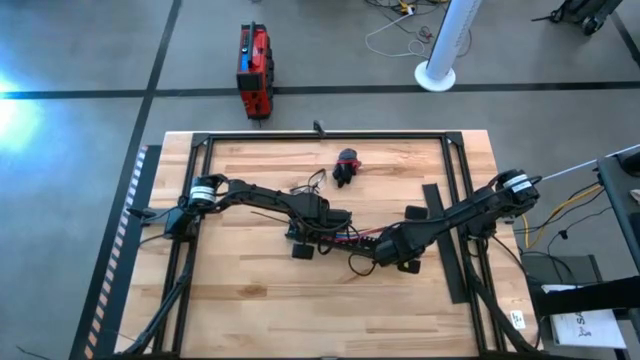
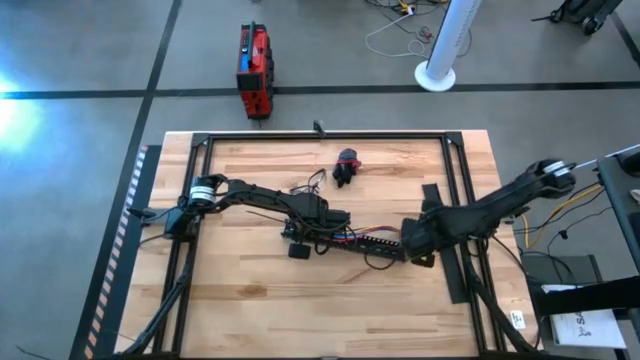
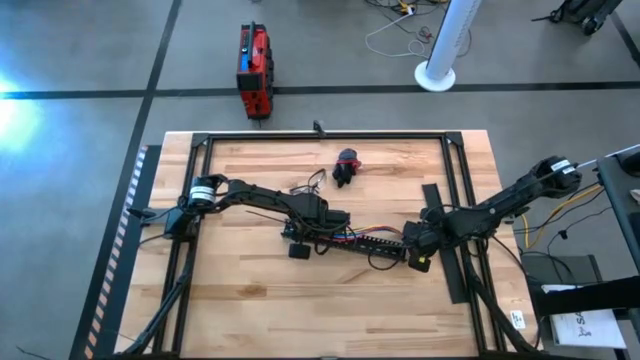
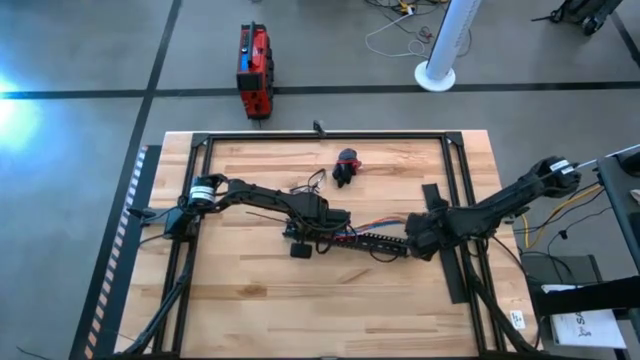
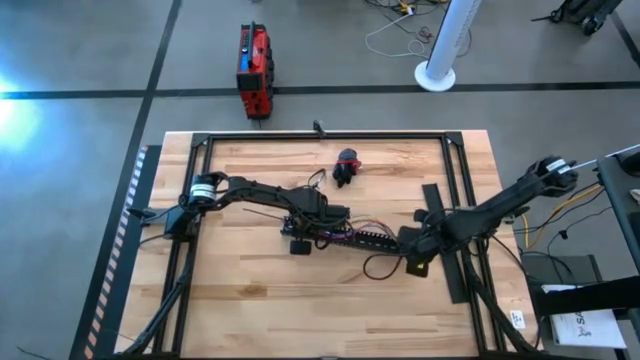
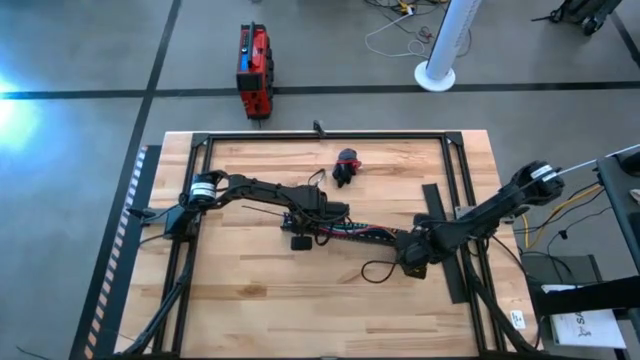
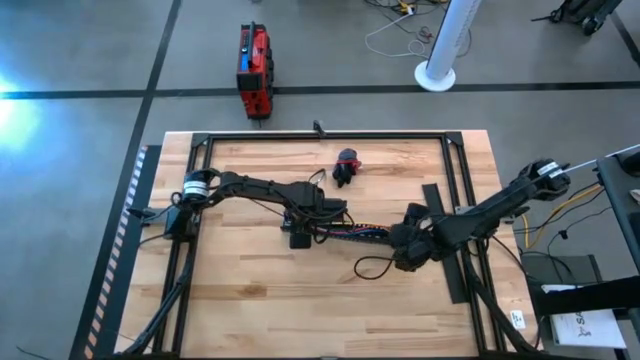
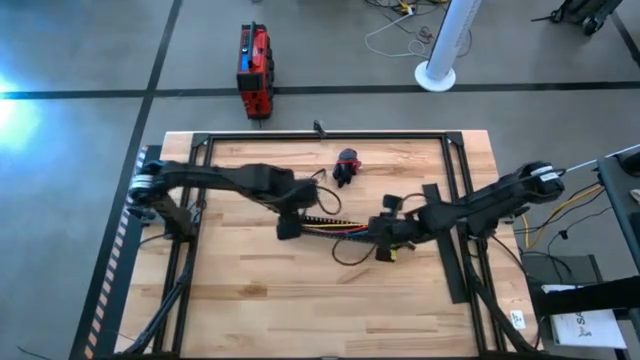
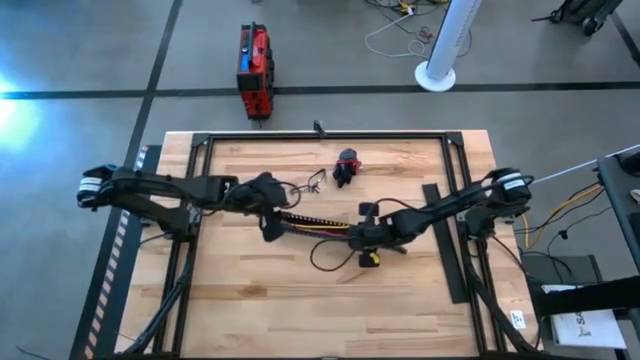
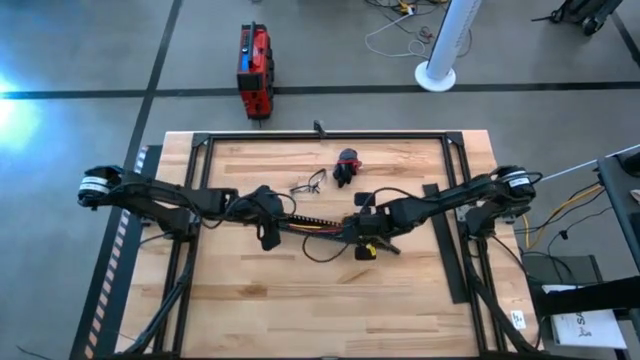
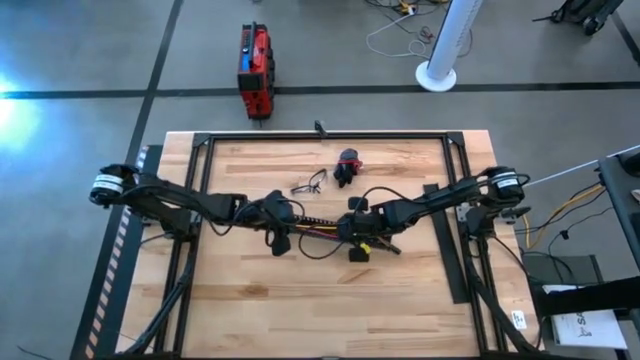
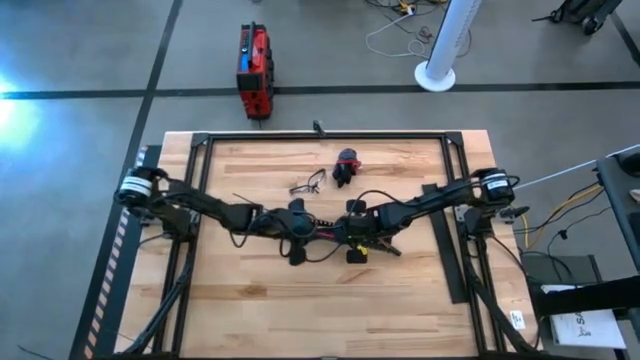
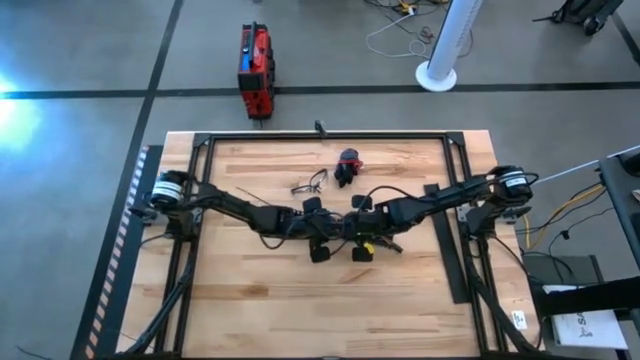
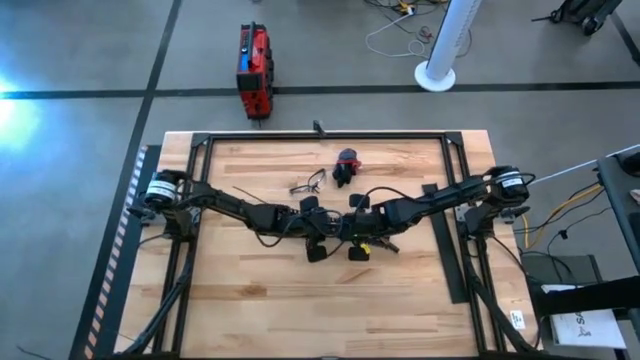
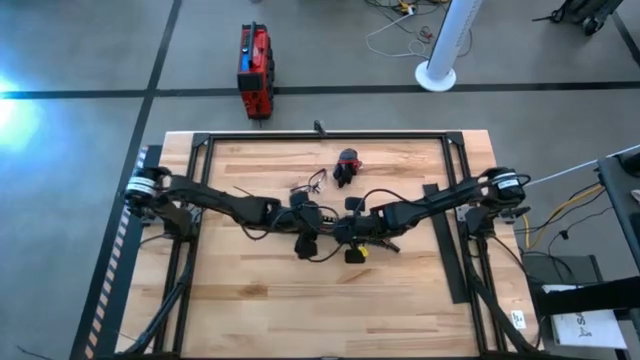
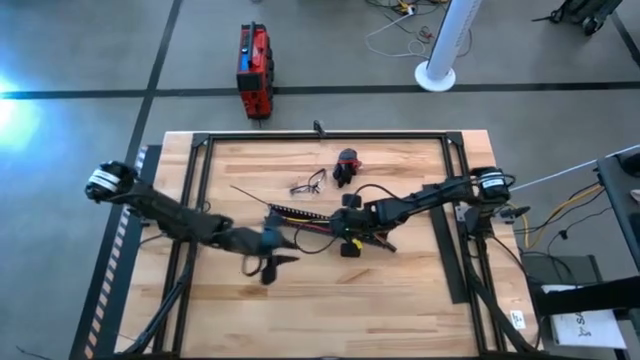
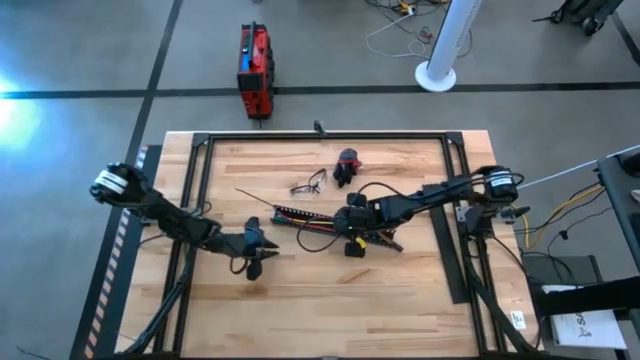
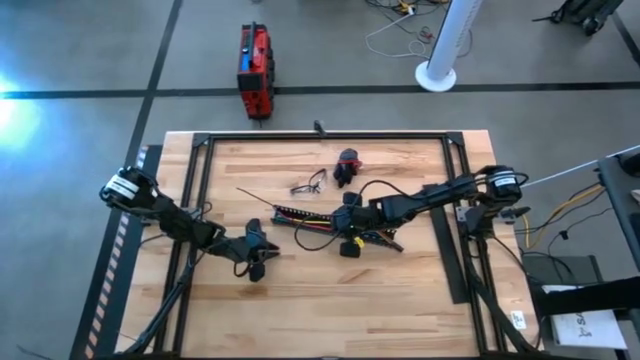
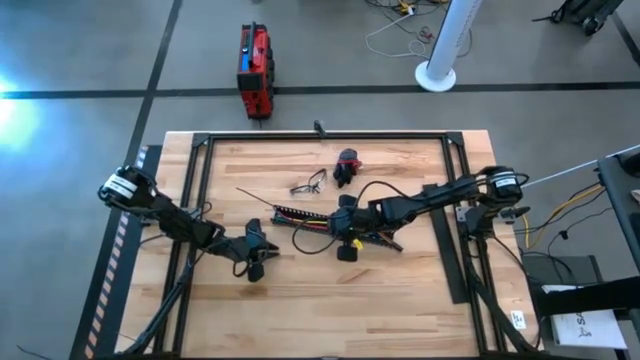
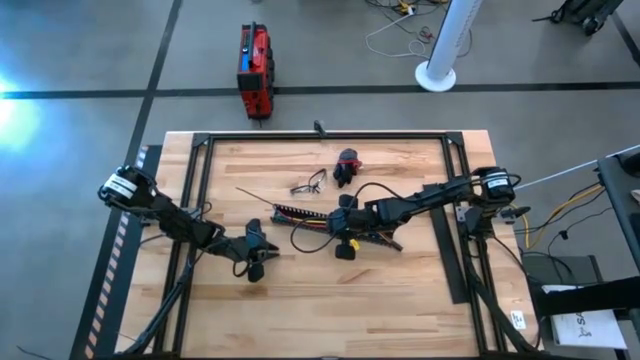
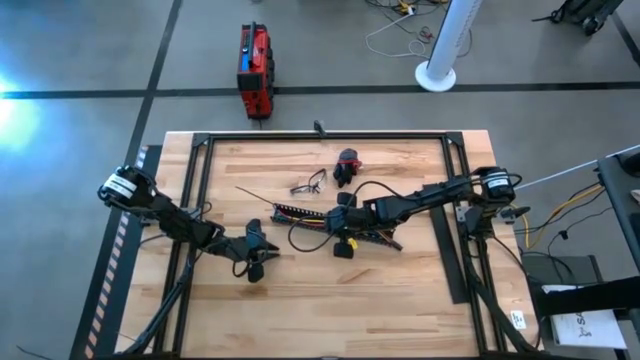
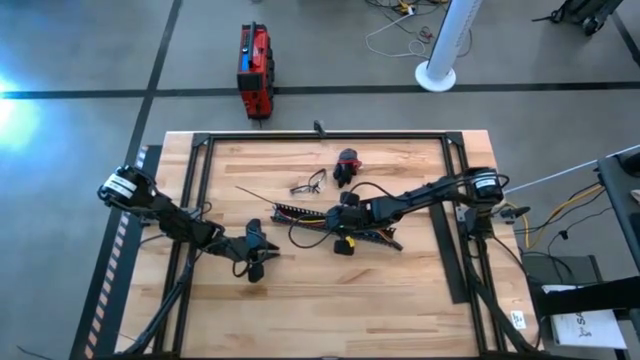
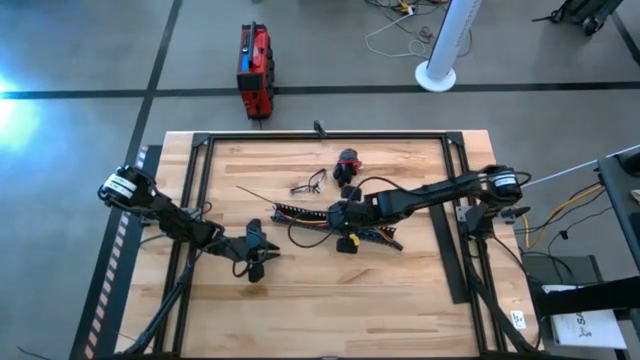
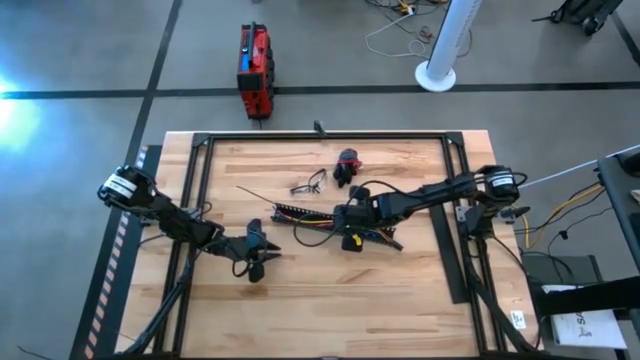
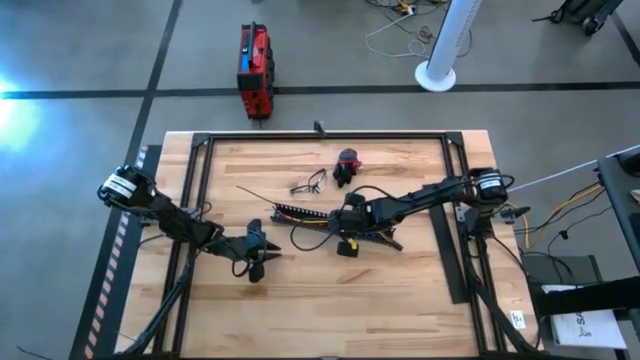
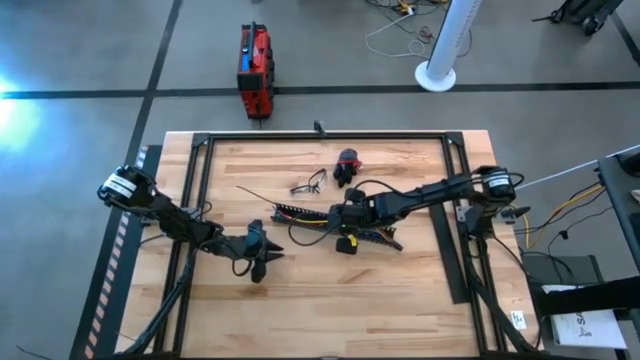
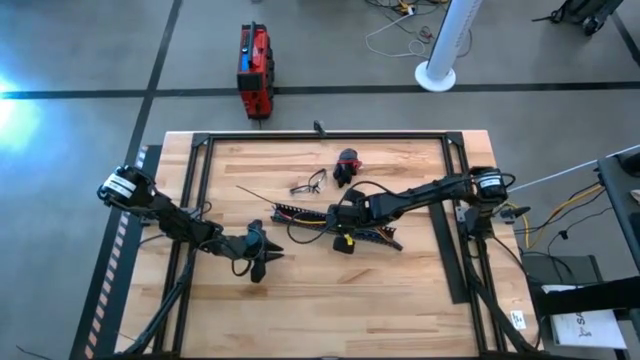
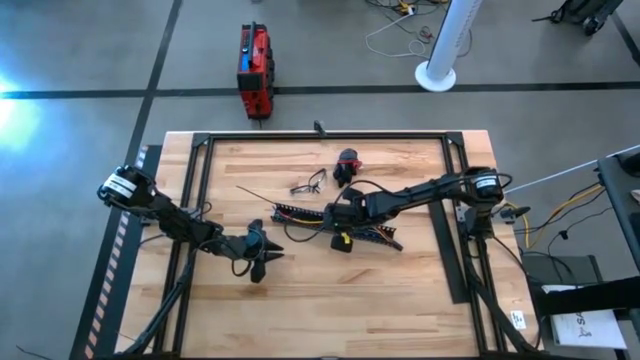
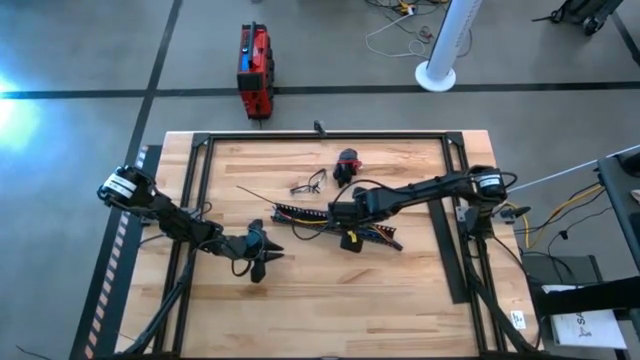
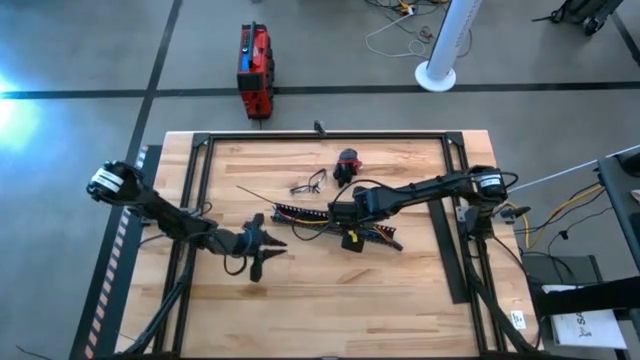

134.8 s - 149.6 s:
Task: Ziptie cables
Put the ziptied cable wires into the black cable duct

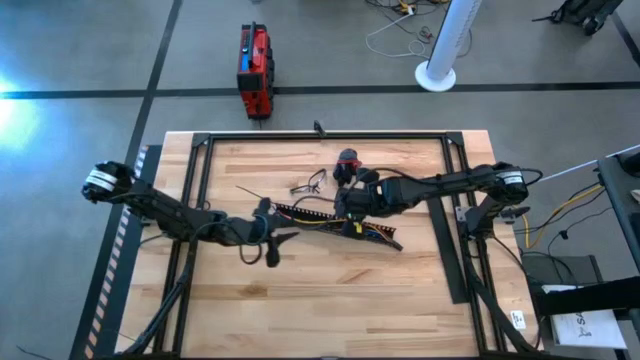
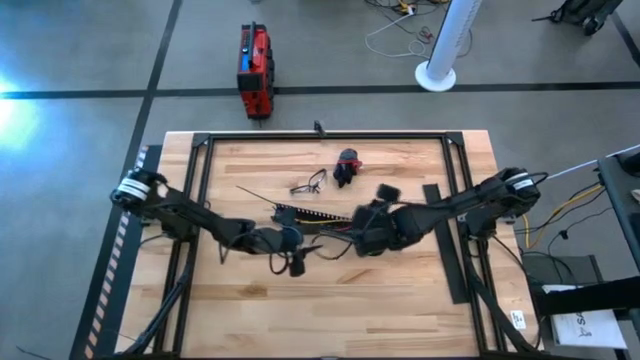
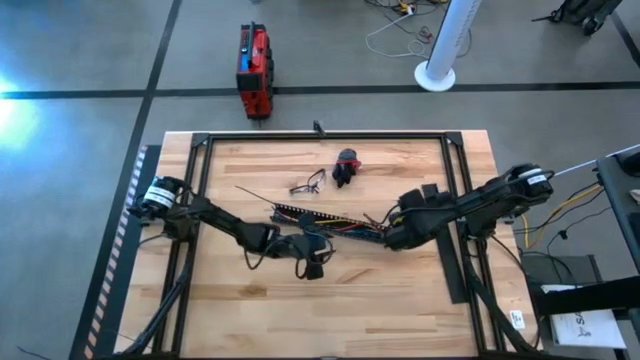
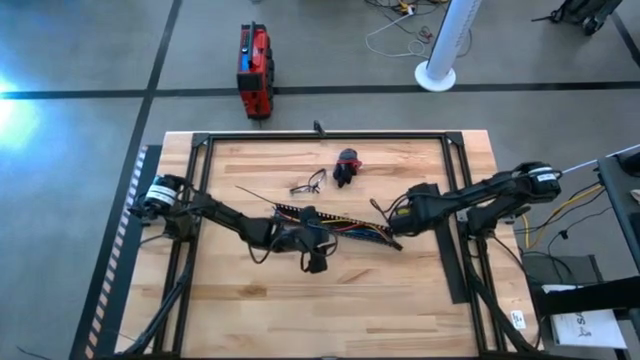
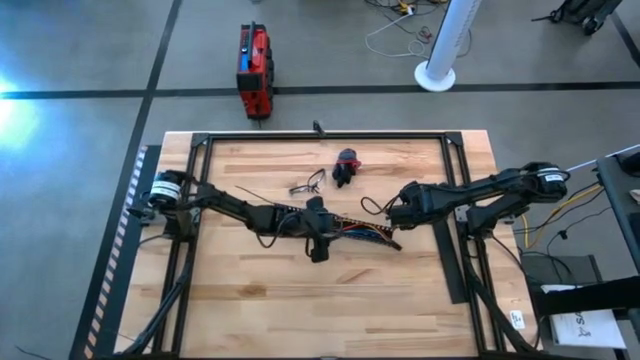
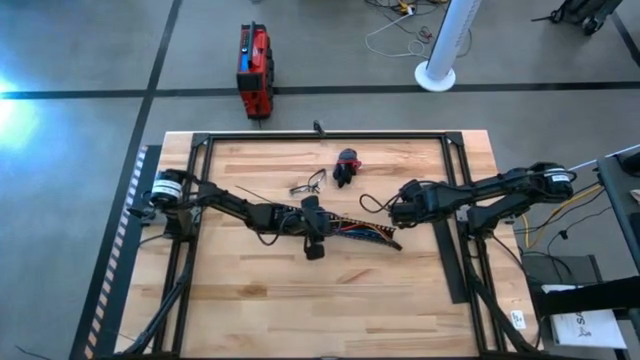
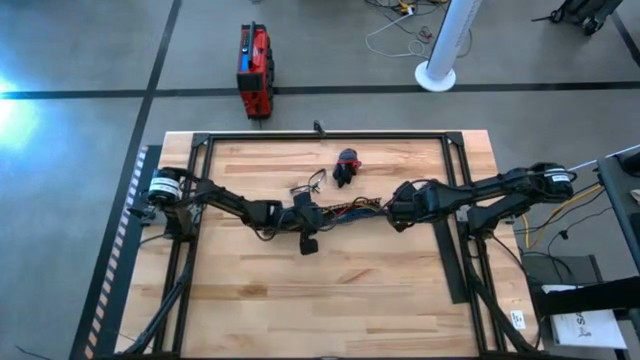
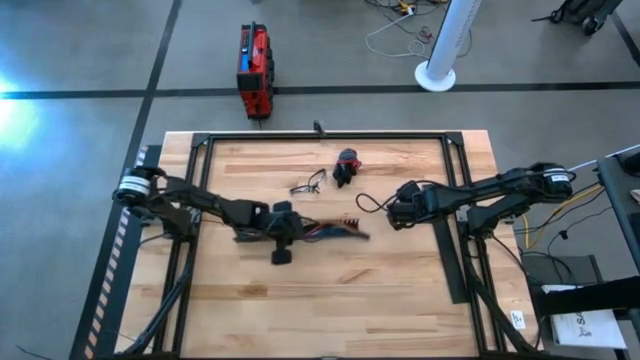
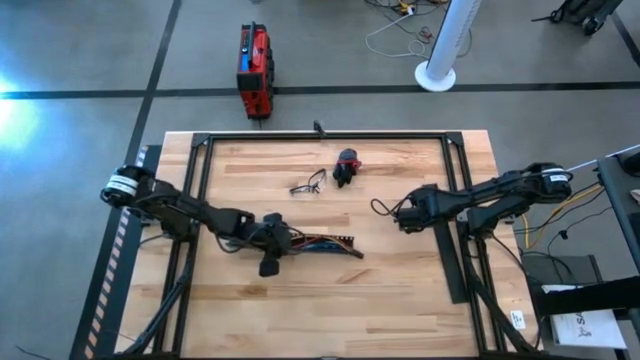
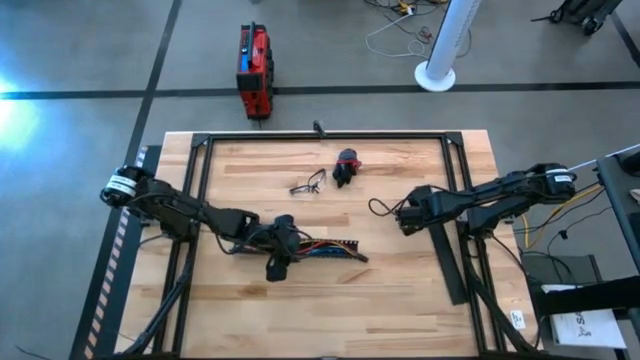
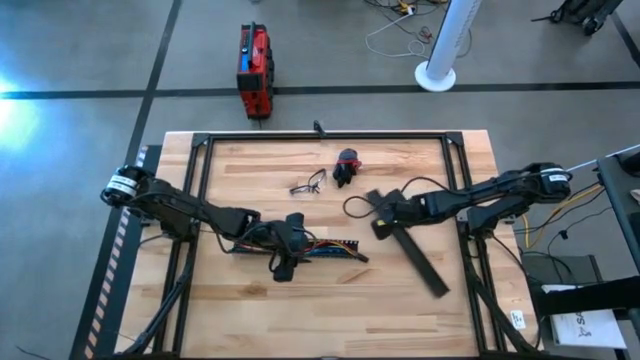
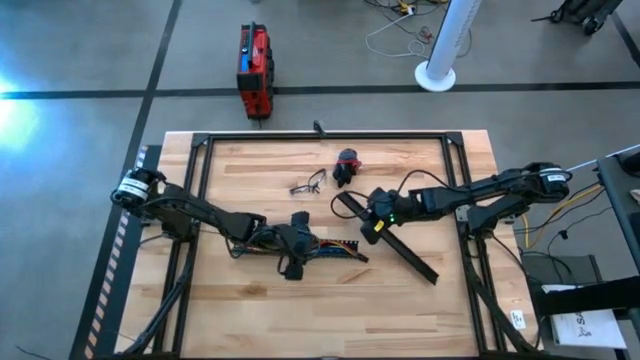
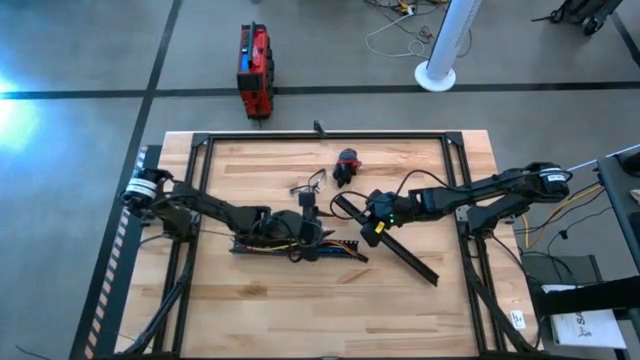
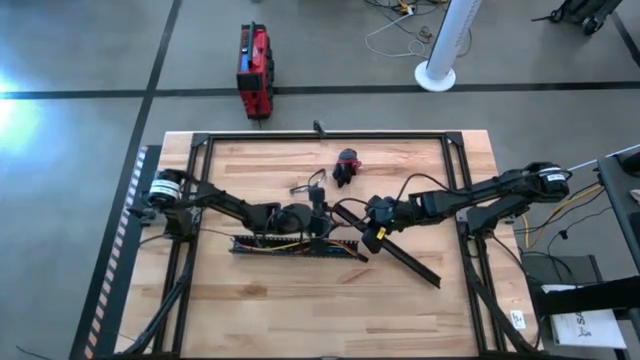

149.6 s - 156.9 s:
Close the black cable duct lid
